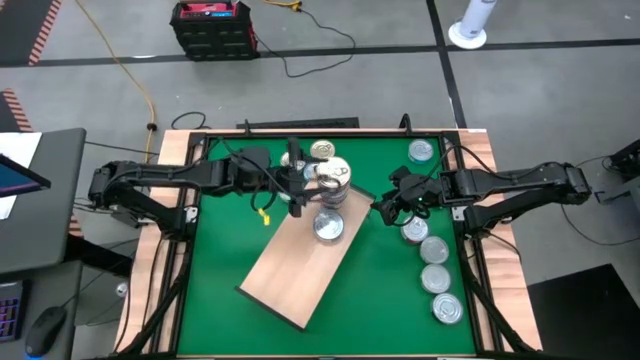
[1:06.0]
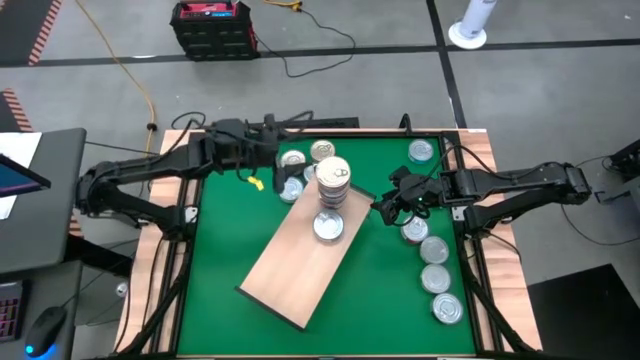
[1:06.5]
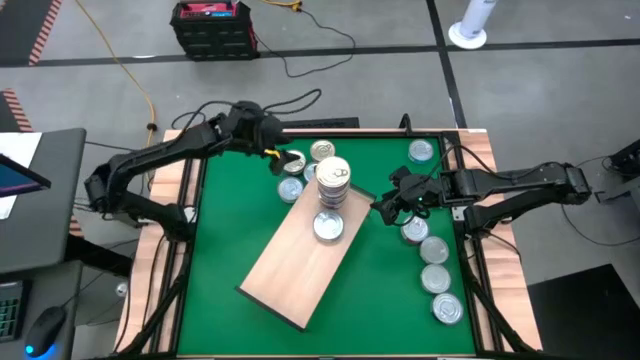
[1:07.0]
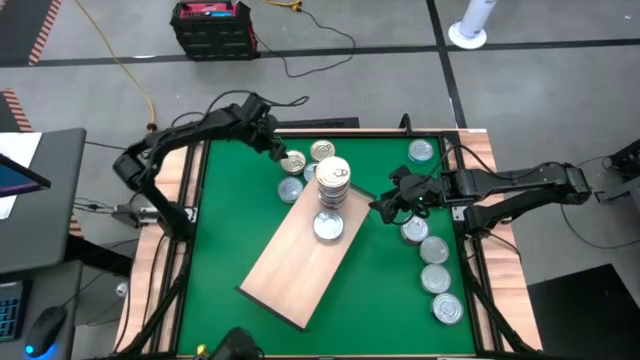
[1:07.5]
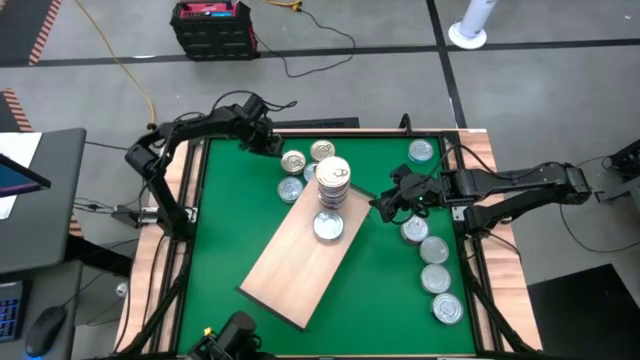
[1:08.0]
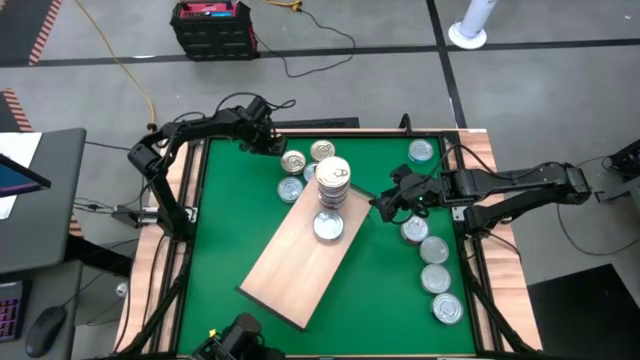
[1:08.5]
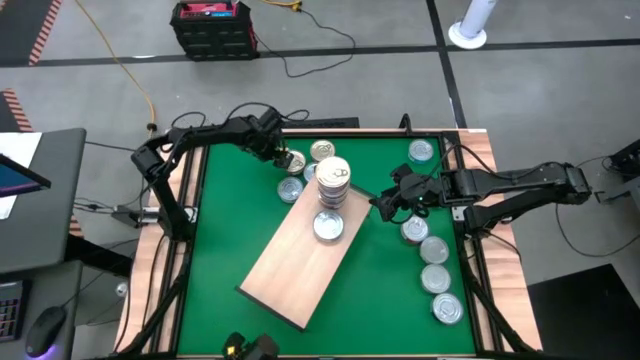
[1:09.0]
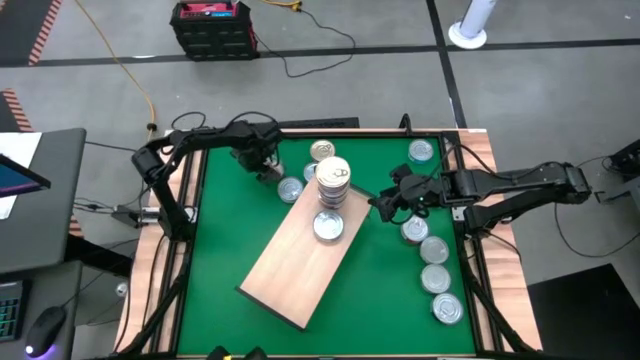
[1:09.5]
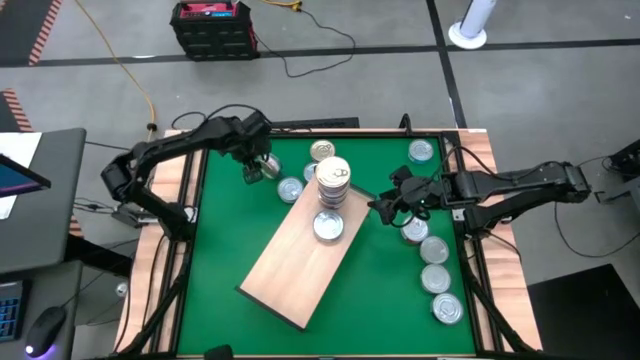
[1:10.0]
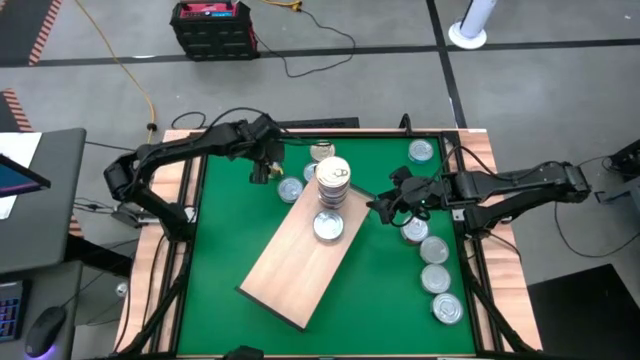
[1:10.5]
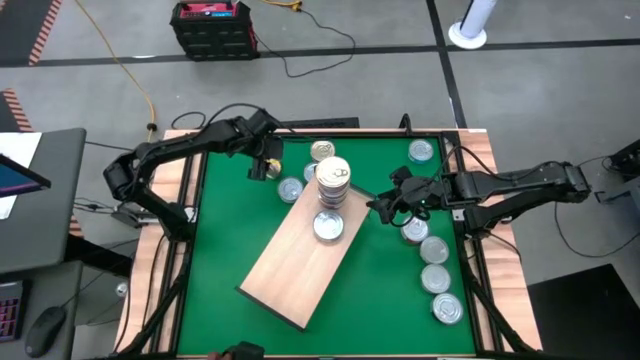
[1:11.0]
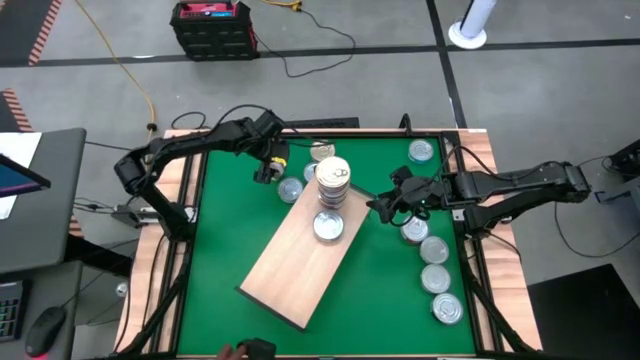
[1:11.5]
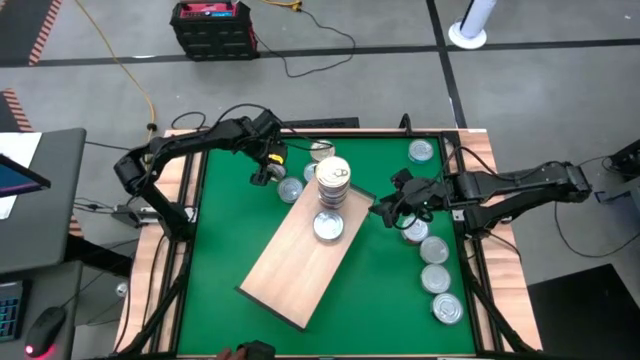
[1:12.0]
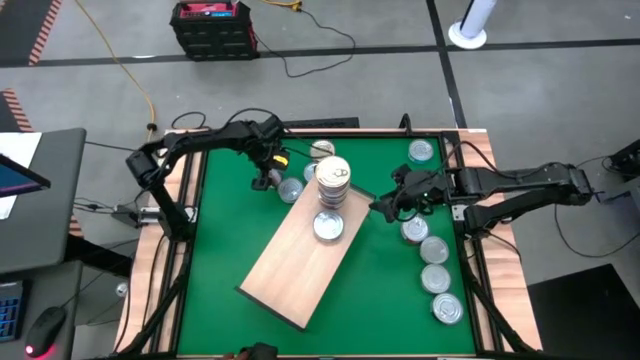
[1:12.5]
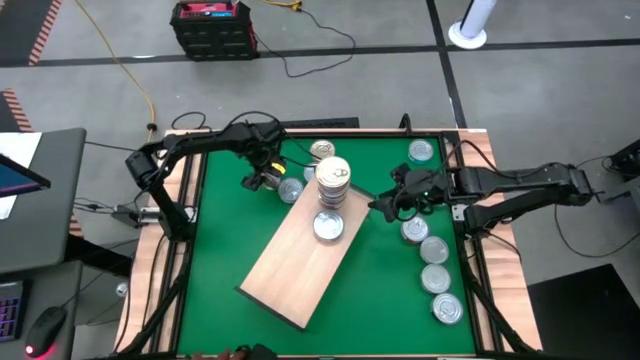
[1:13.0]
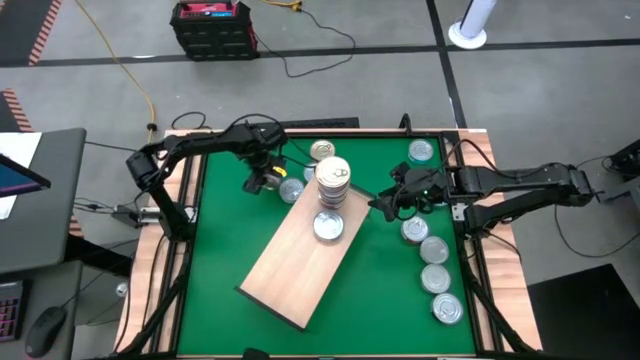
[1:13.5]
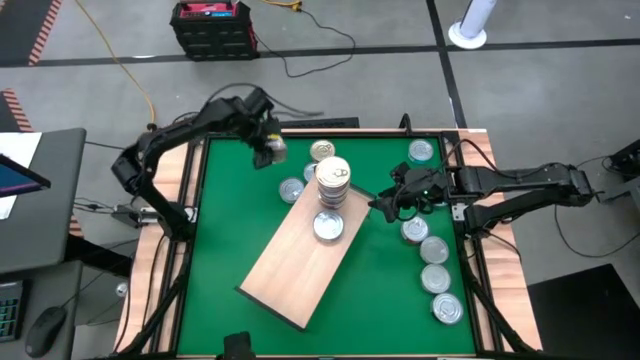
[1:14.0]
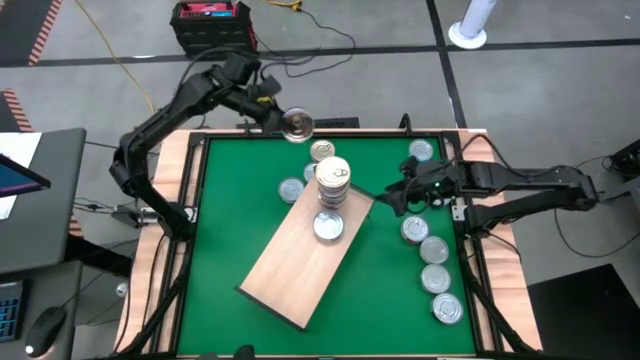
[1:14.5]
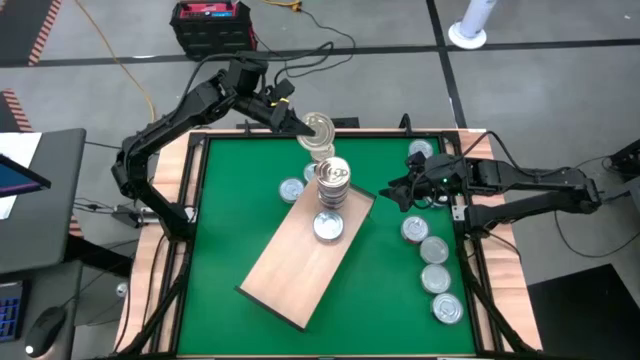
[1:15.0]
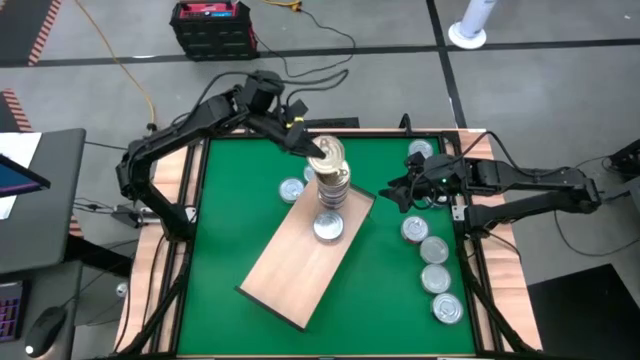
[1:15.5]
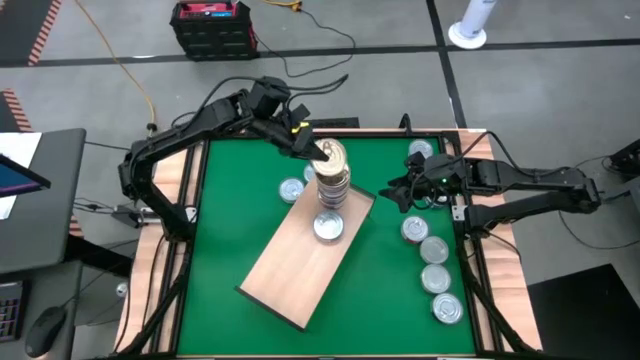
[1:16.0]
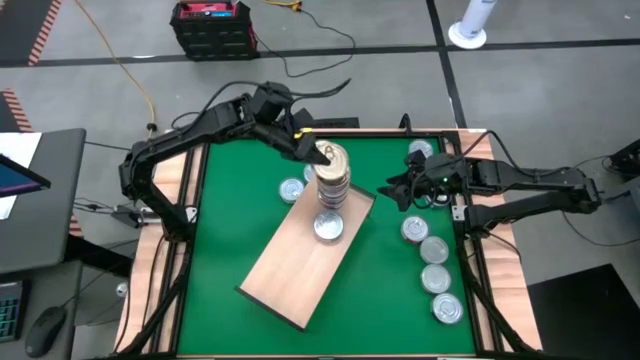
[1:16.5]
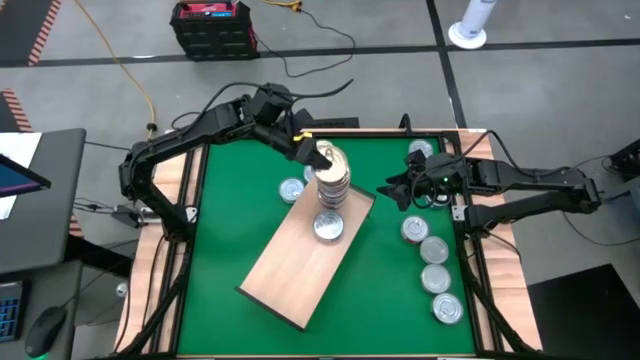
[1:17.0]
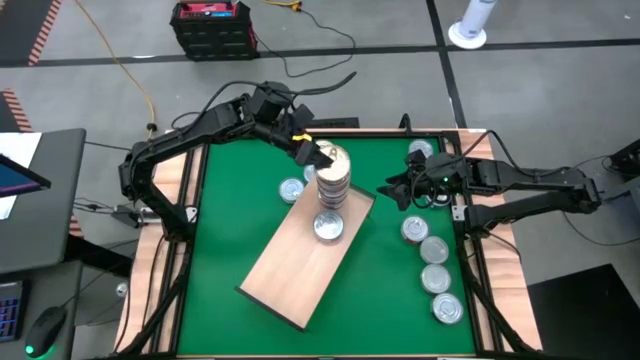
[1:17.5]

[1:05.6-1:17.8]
Task: Stack canned seafood by type on shelf
Stack the blue pink tuna can on top of the other blue pink tuna cans on the shelf

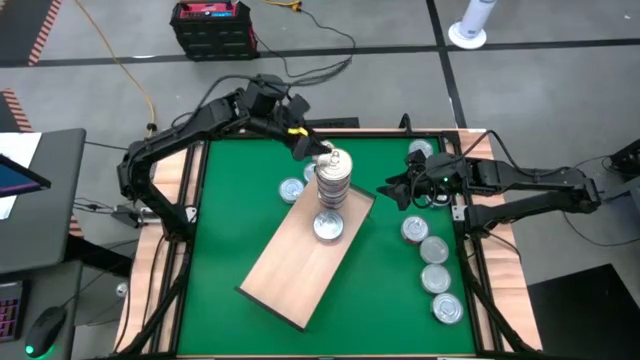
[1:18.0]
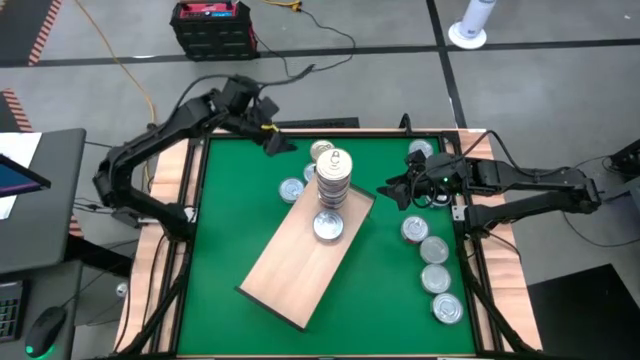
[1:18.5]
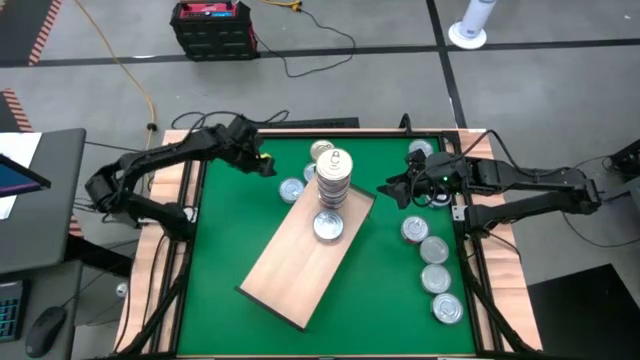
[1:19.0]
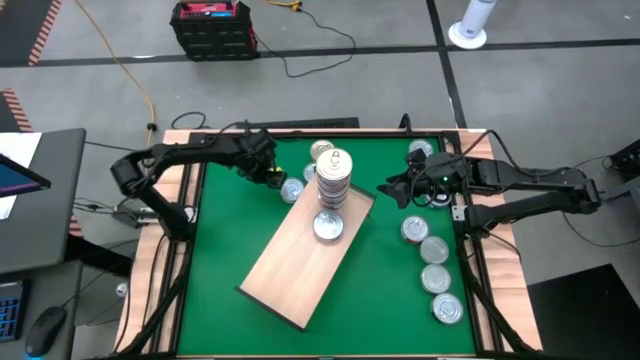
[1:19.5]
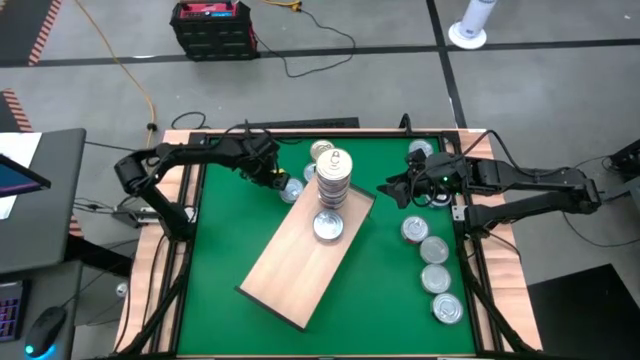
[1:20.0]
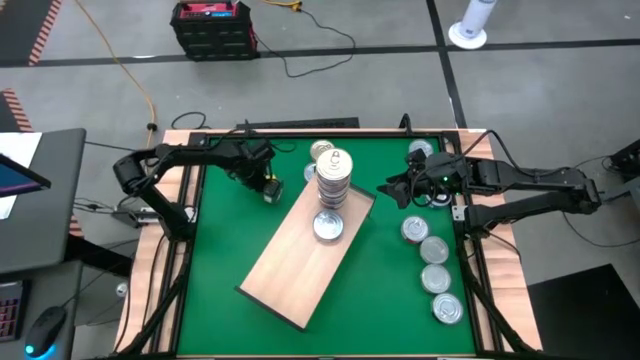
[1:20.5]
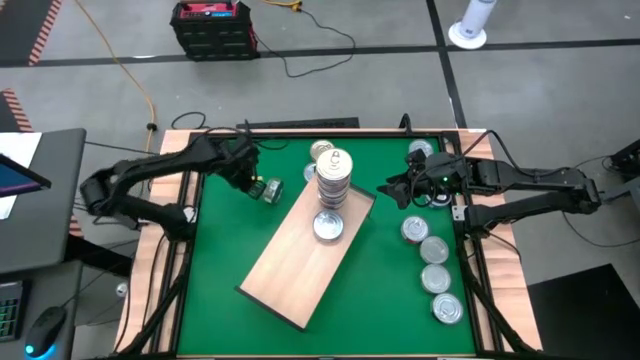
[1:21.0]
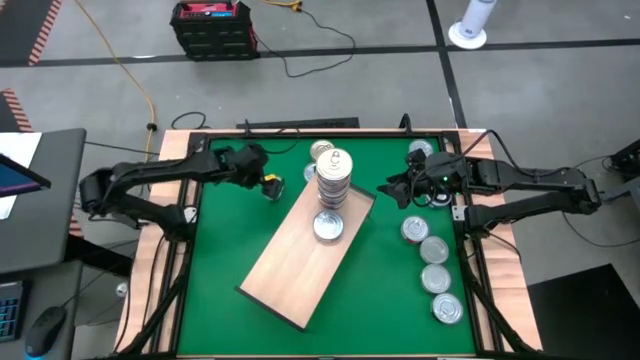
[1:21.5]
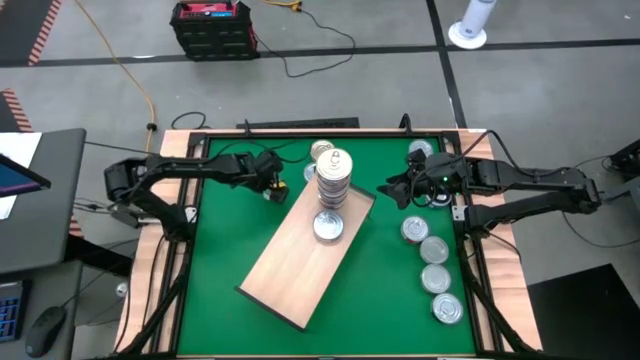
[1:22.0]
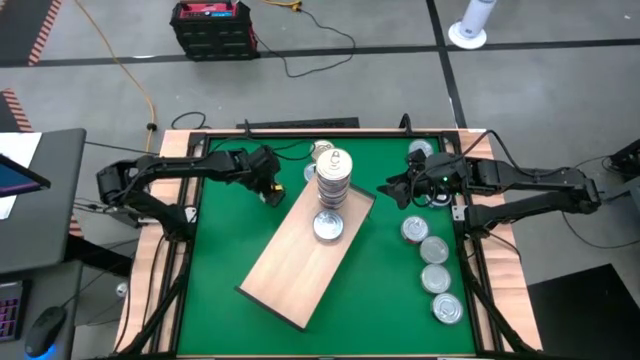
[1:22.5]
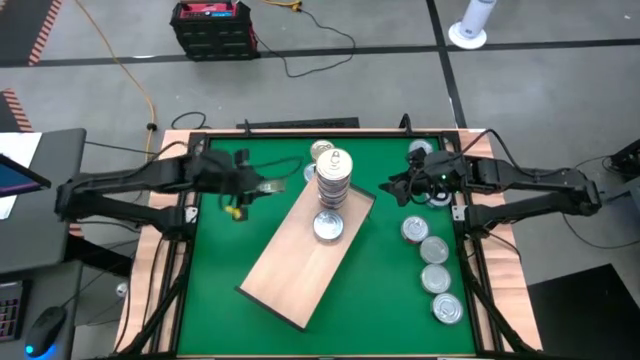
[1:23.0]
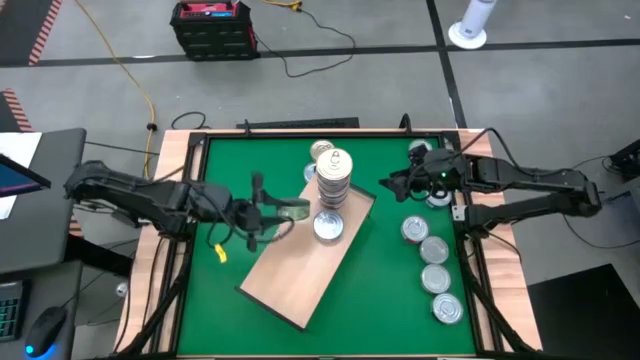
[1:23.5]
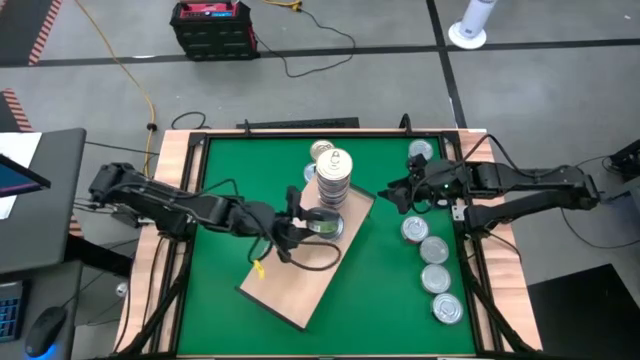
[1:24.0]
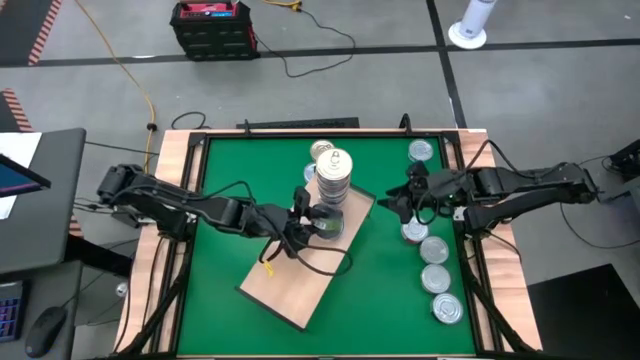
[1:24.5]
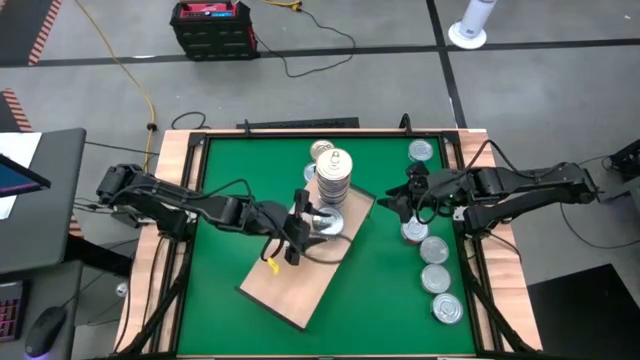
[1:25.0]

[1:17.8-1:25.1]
Stack the green tuna can on top of the blue tuna can on the shelf

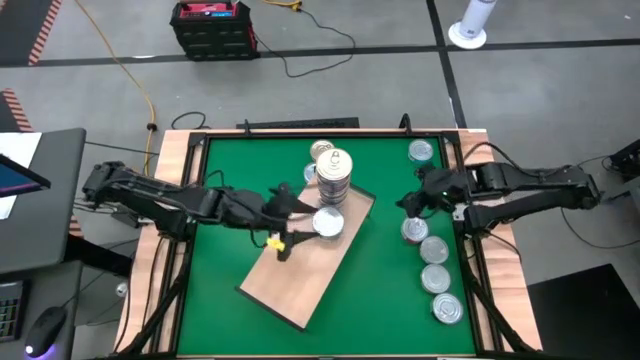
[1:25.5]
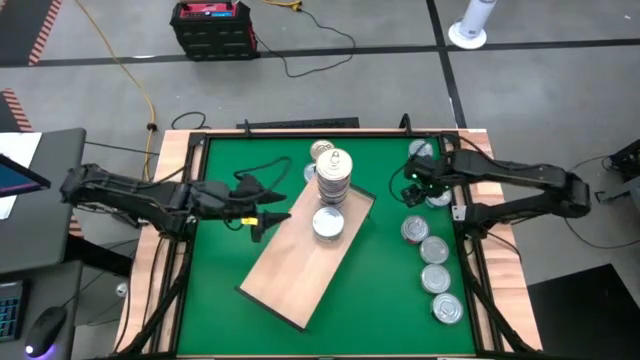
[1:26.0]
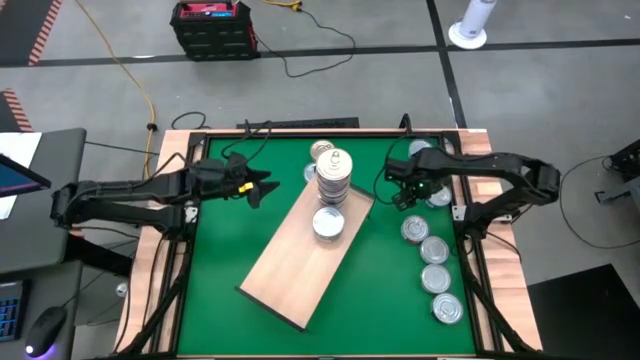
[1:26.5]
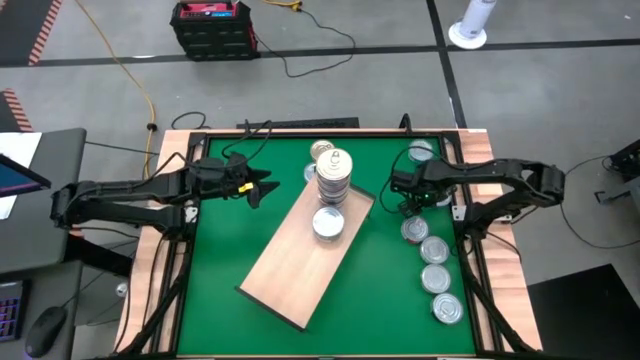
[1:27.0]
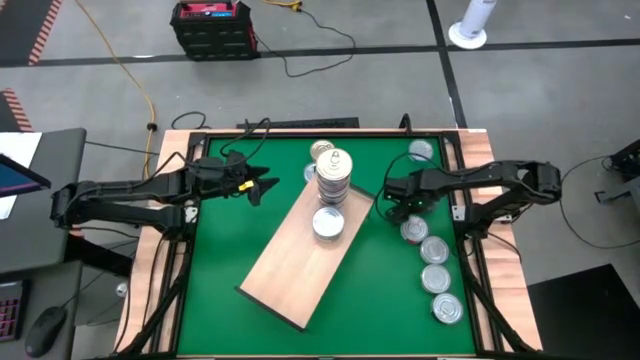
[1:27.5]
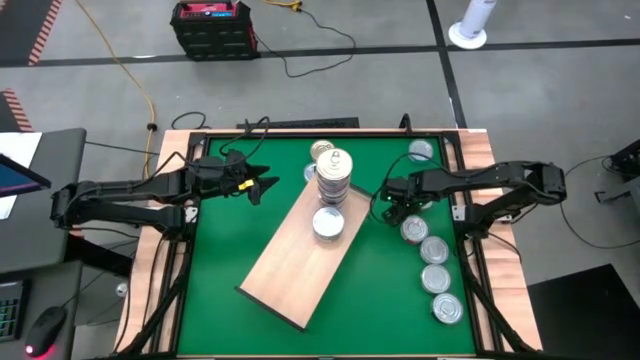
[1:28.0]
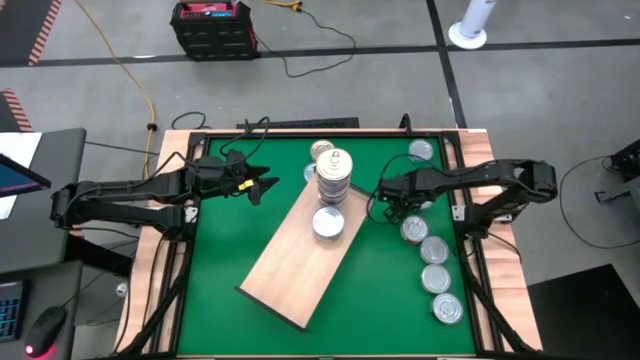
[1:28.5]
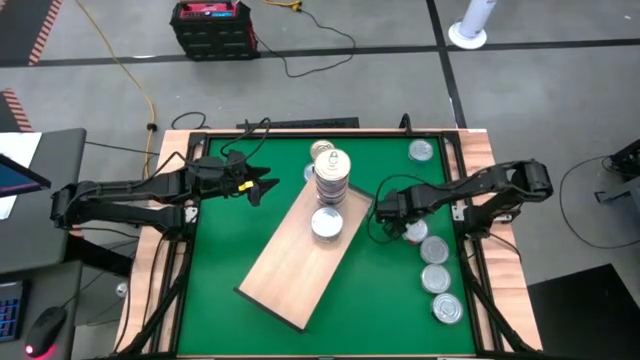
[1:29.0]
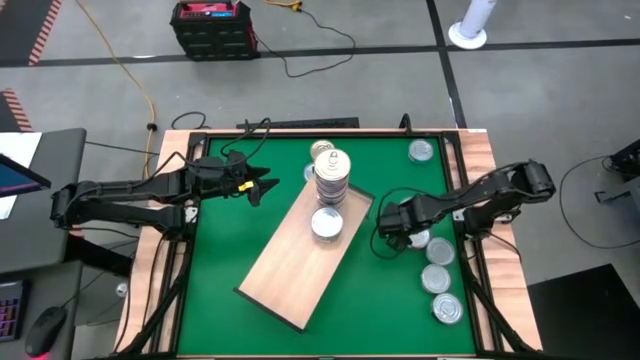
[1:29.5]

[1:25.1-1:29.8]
Stack the blue tuna can on top of the green tuna can on the shelf
